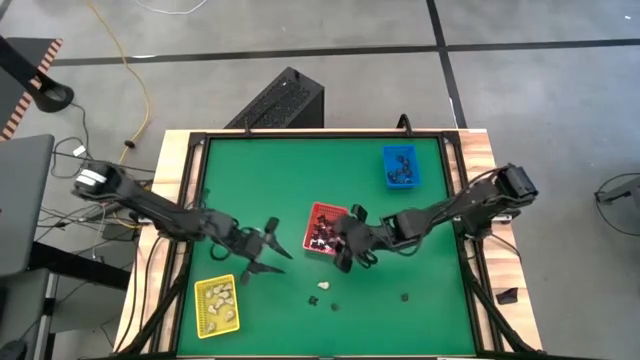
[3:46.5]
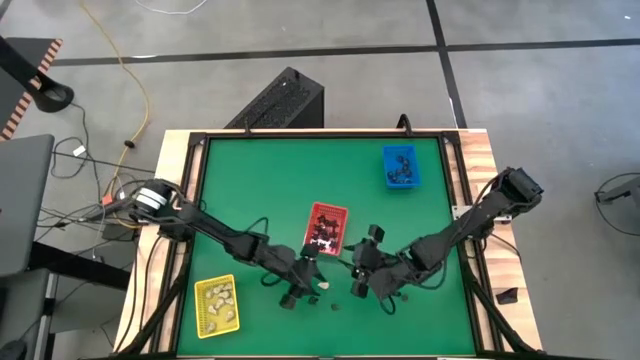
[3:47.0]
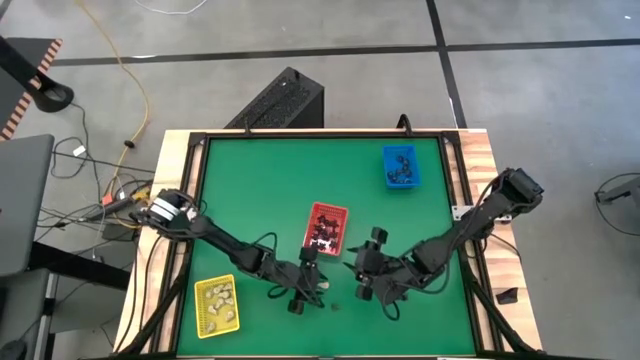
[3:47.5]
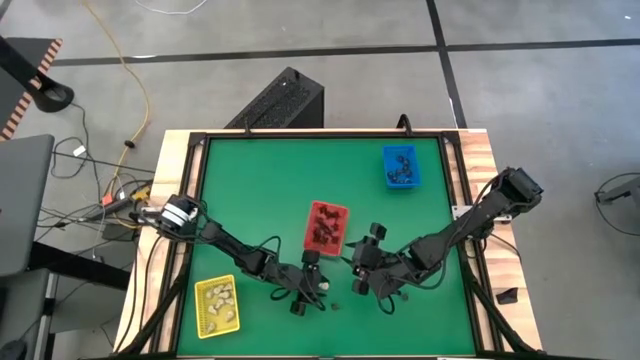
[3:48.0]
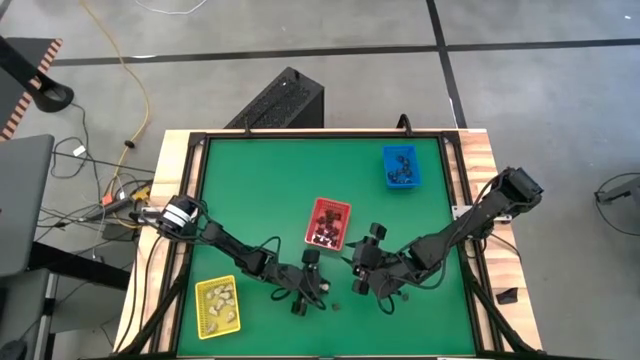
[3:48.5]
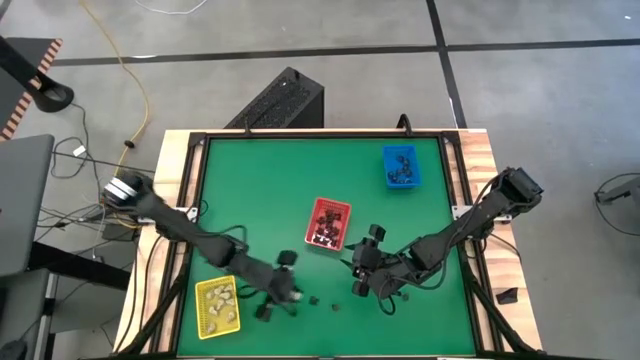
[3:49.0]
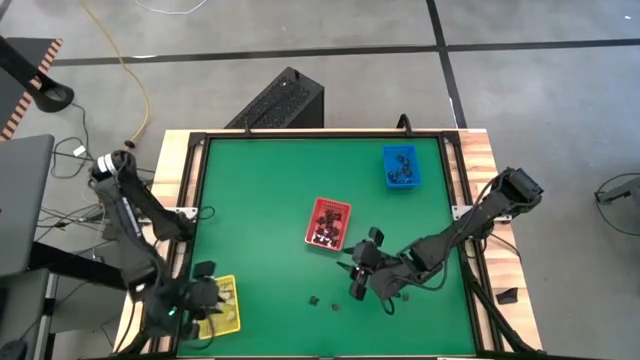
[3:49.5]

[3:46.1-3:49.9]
Task: Sort Halloween decoration
Put the white skull toy into the yellow bin

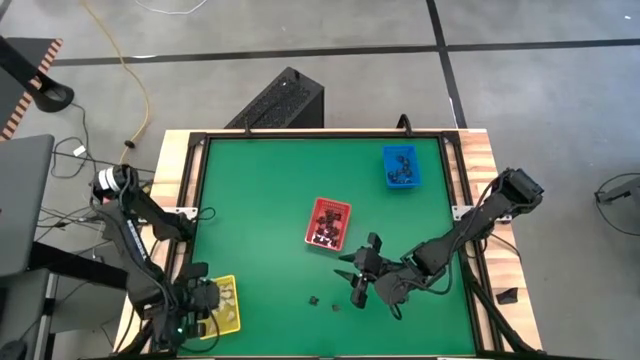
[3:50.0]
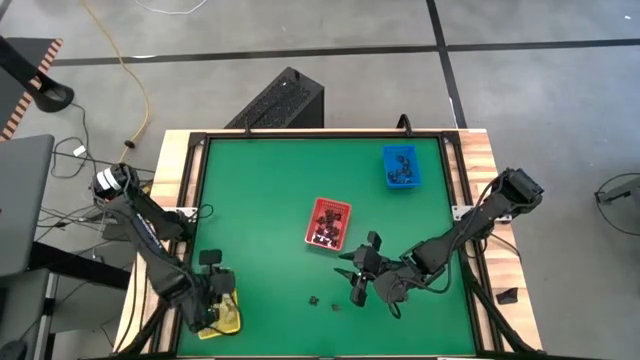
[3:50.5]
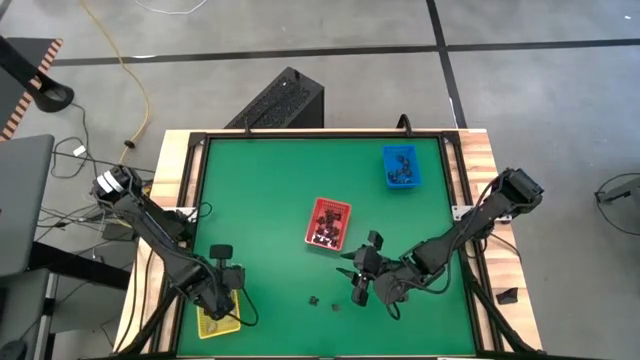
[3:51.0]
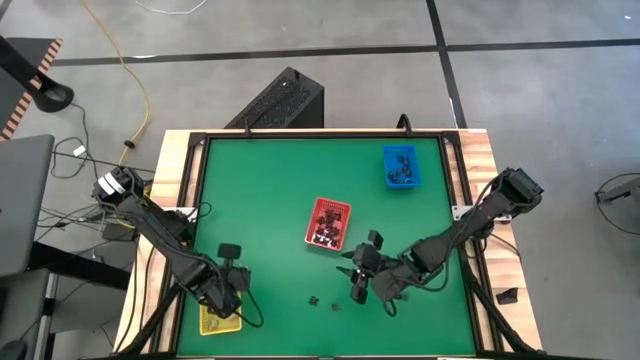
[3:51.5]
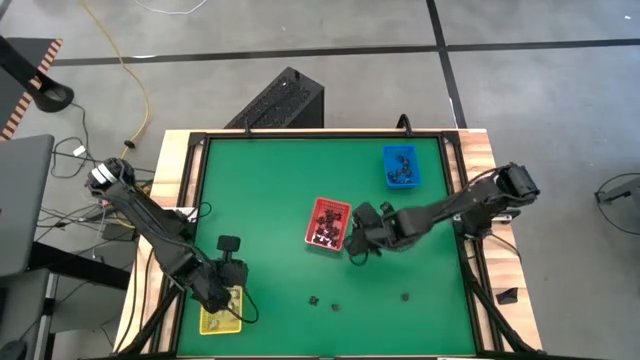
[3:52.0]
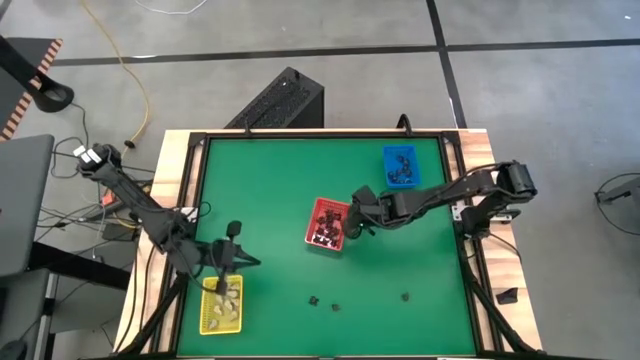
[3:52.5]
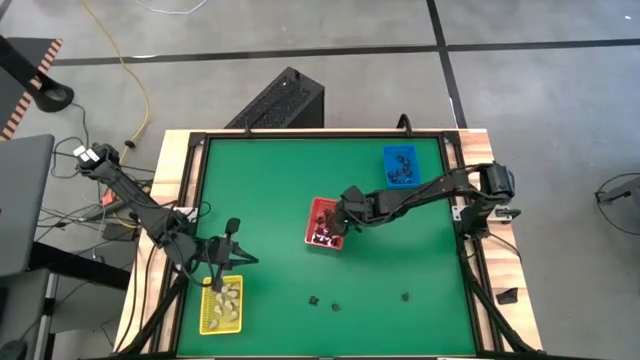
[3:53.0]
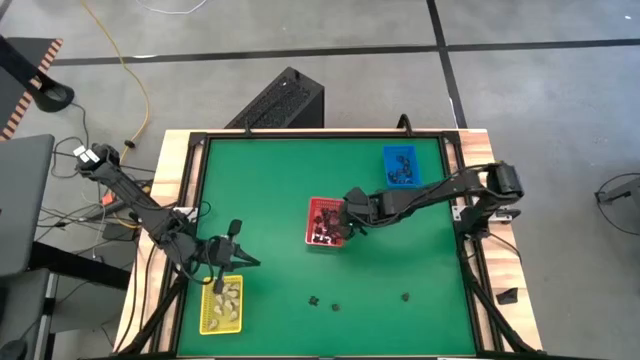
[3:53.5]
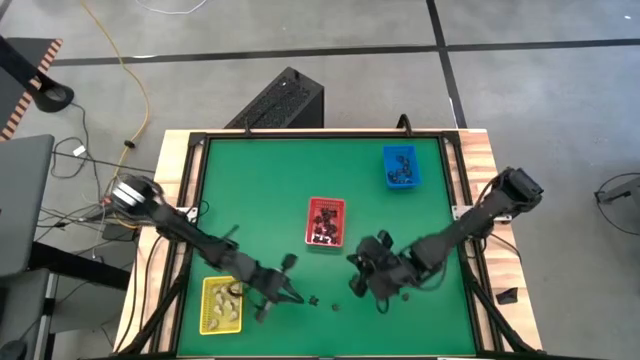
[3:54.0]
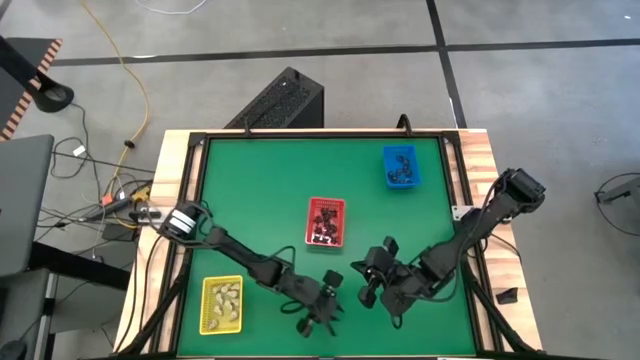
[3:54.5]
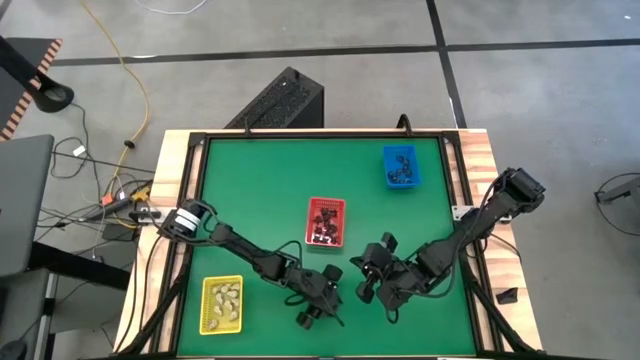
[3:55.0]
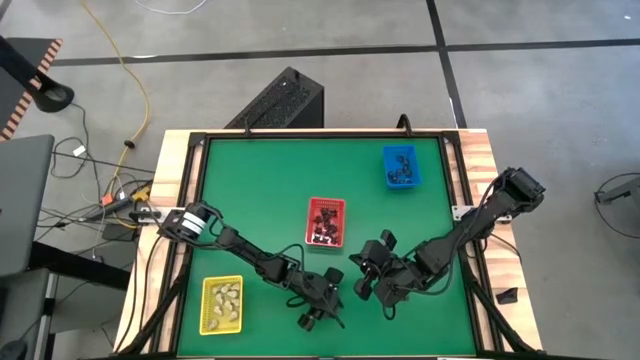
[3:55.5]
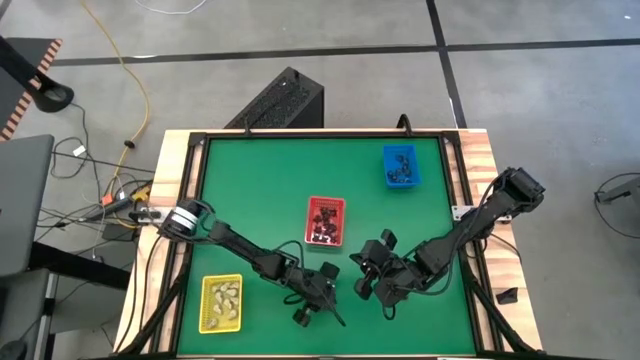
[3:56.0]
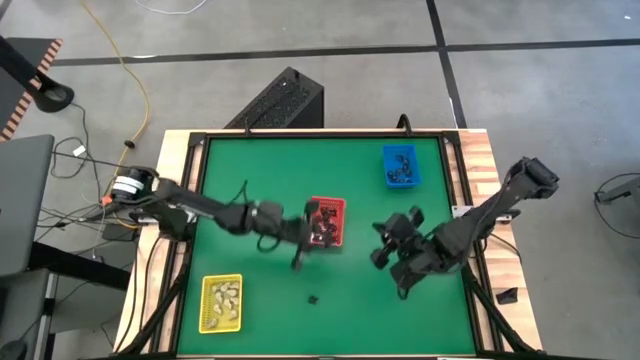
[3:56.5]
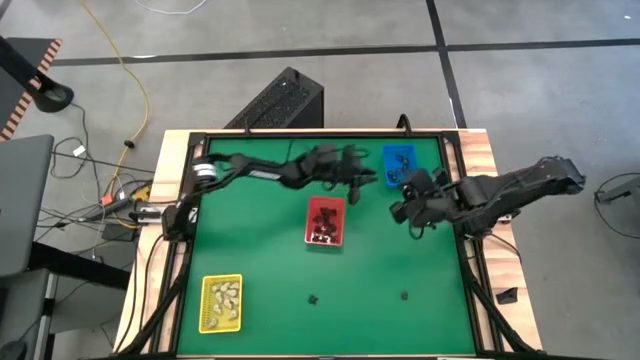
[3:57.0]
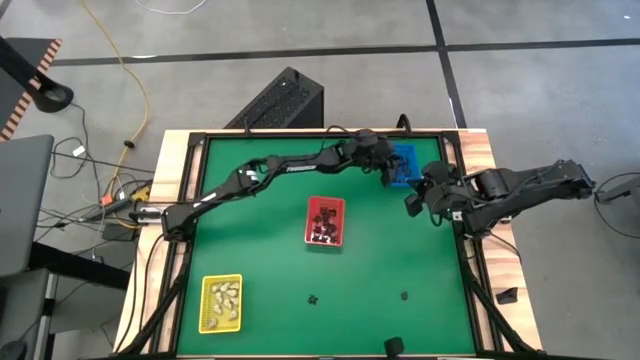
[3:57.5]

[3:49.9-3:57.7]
Put the black skull toy into the blue bin

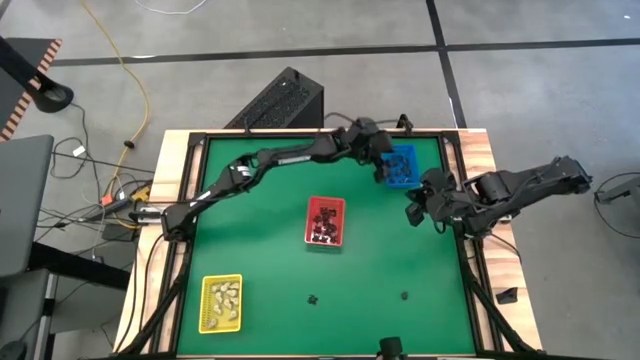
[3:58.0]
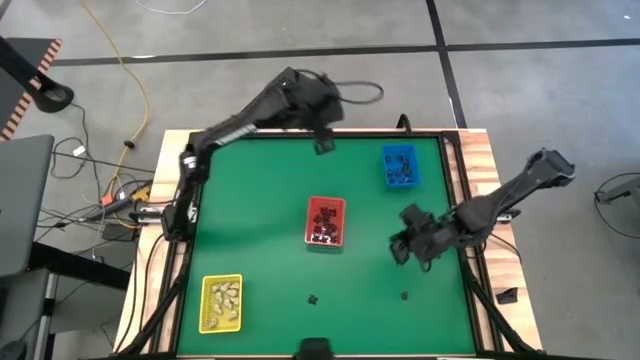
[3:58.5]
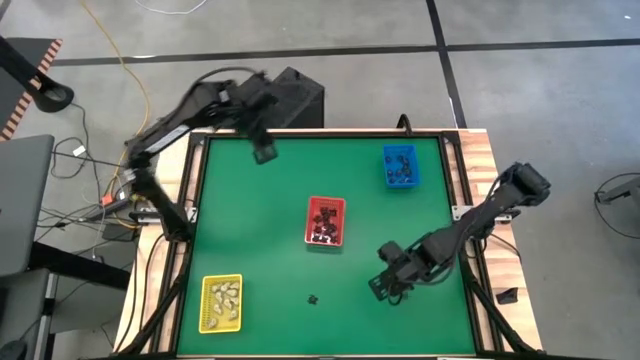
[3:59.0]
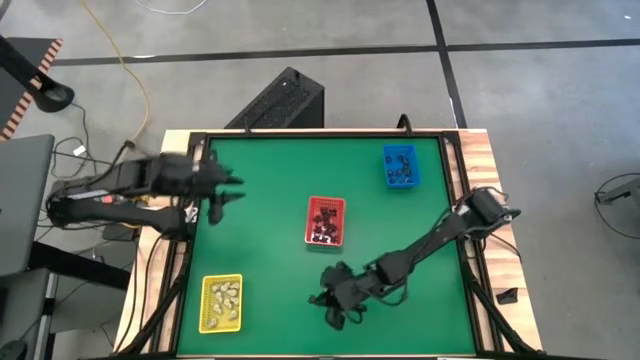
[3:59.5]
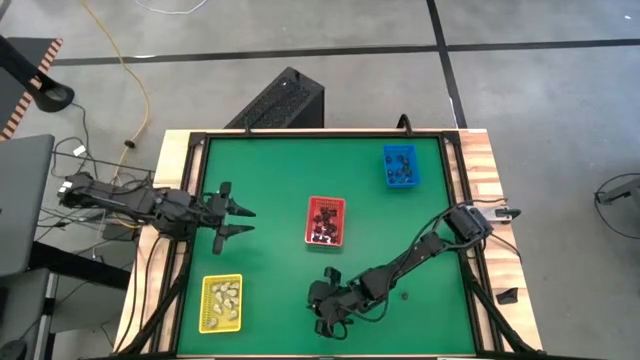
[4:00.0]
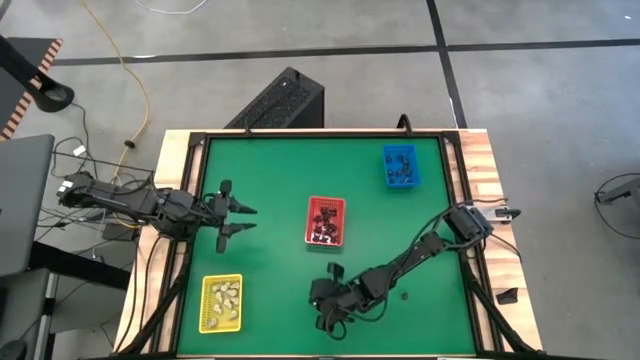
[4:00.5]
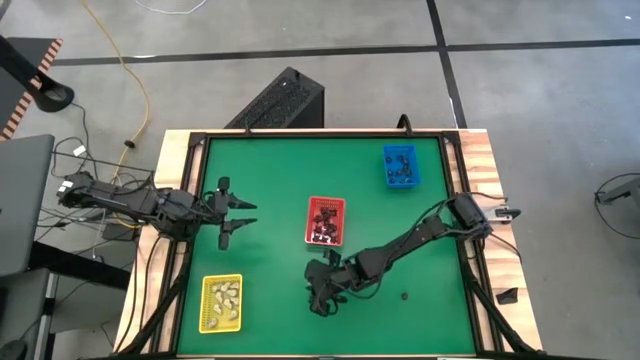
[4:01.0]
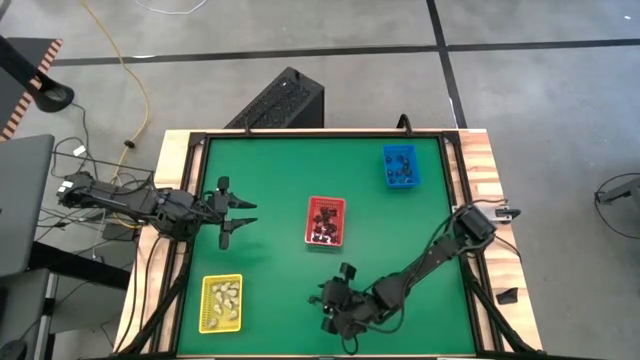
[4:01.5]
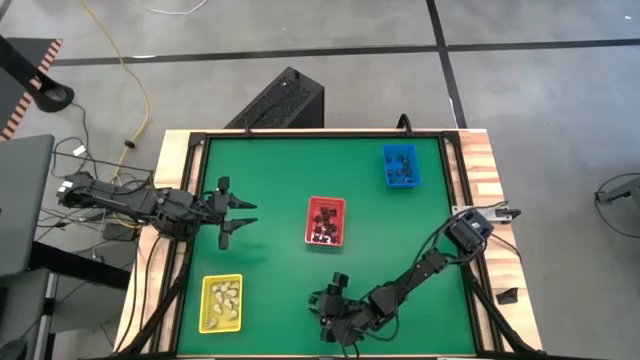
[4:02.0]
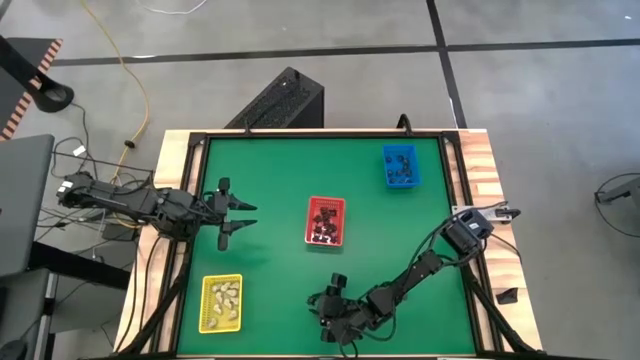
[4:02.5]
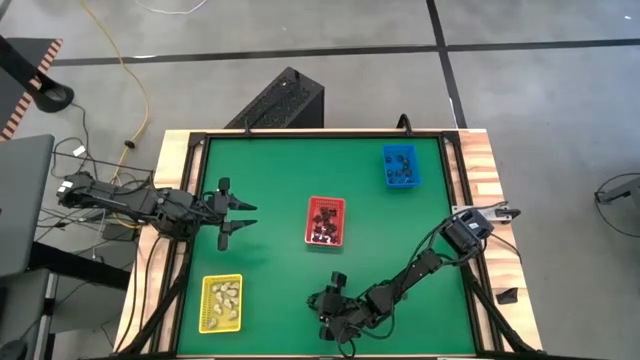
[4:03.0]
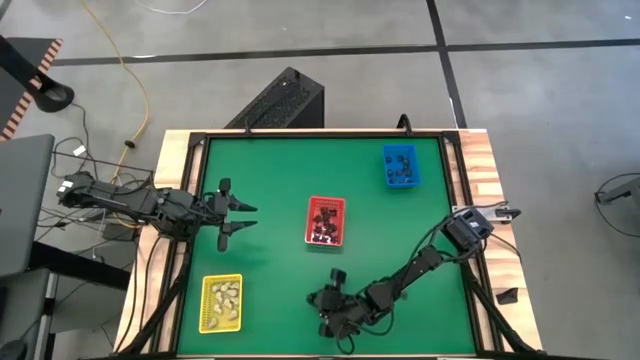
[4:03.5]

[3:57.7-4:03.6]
Put the black spider toy into the red bin

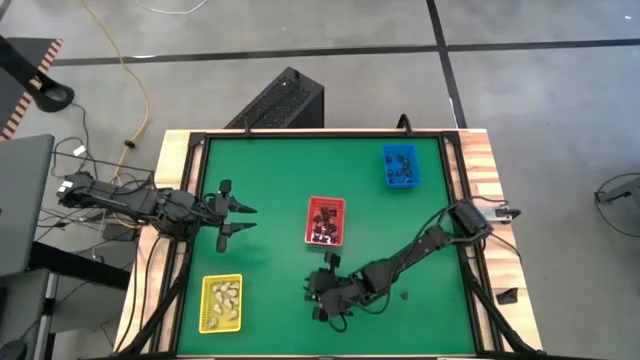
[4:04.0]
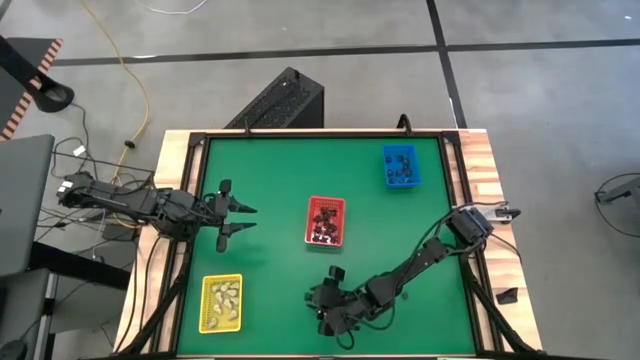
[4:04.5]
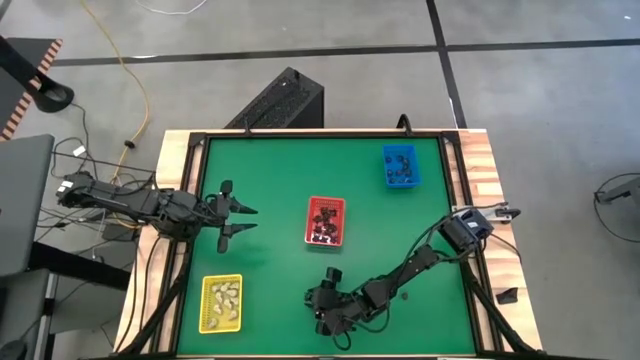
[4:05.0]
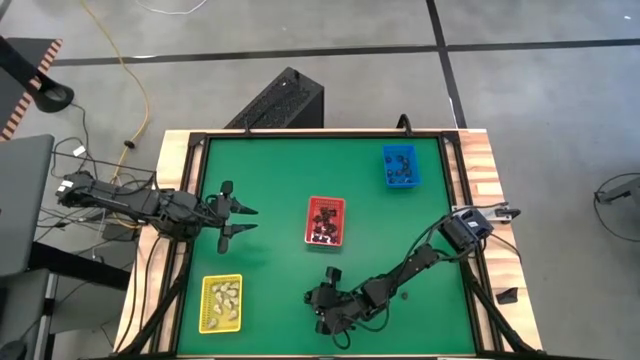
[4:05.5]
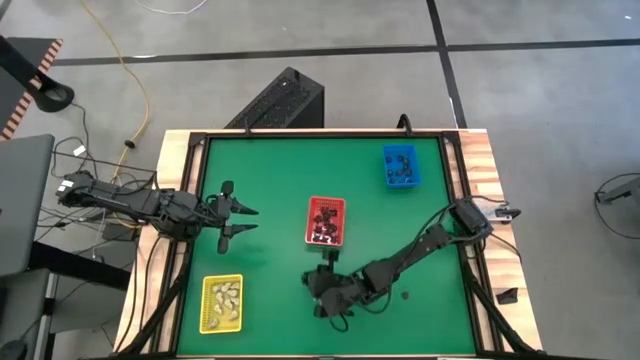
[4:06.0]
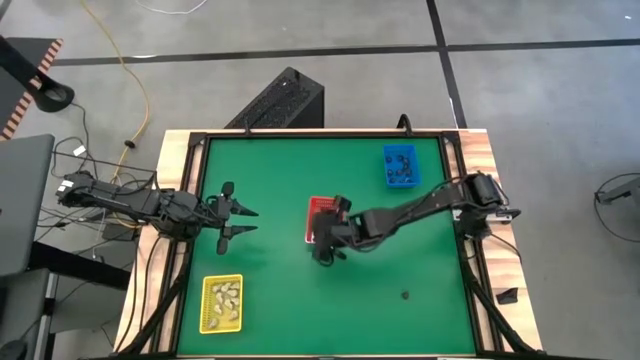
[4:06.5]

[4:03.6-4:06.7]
Put the black spider toy into the red bin
